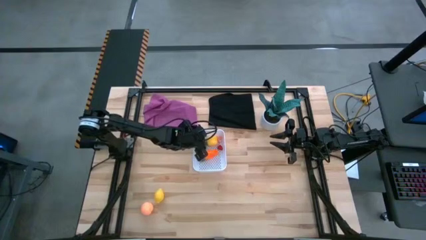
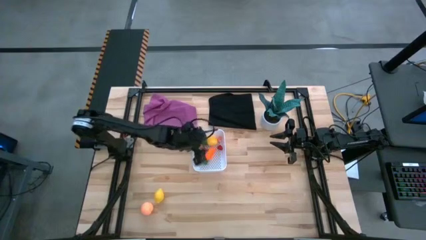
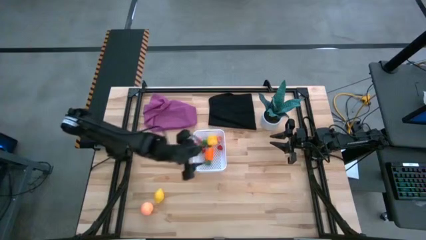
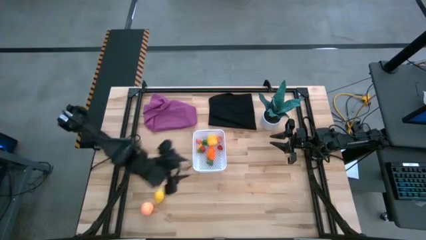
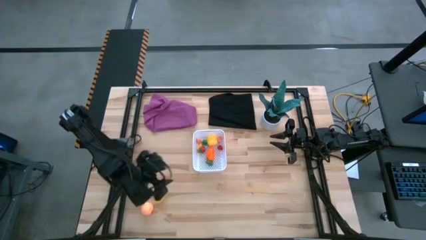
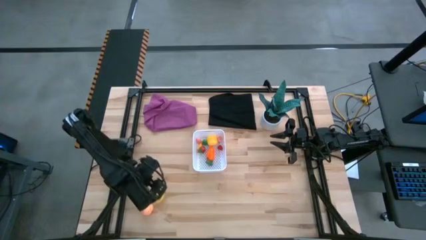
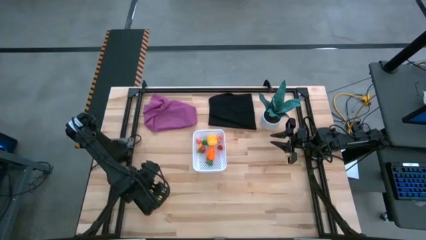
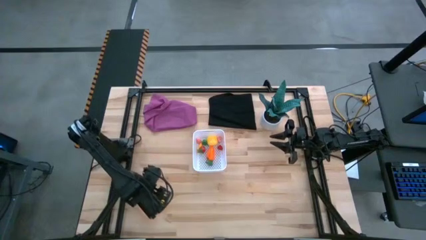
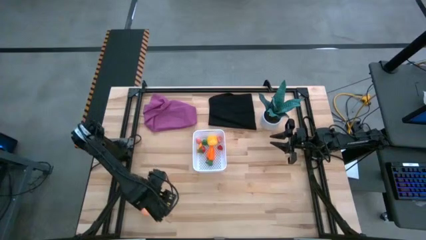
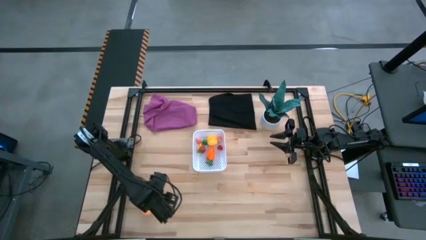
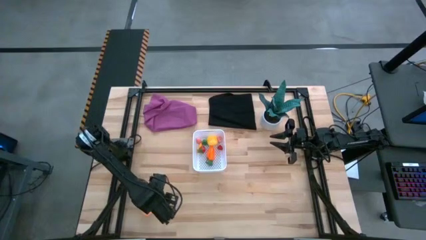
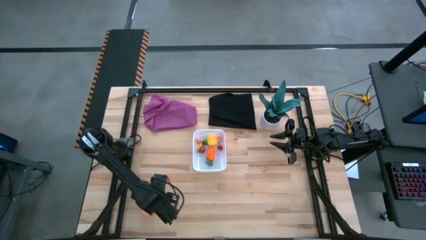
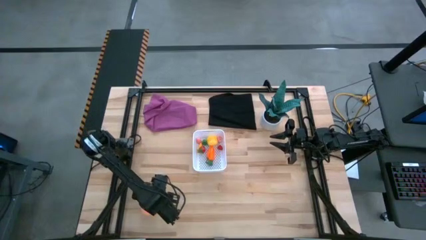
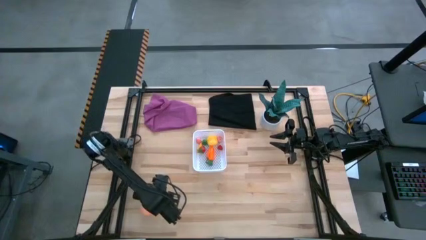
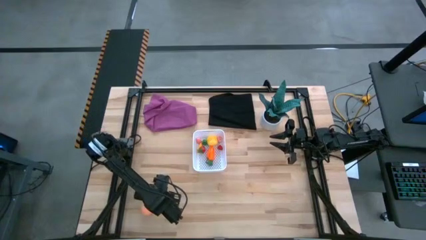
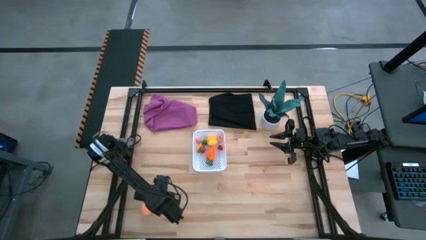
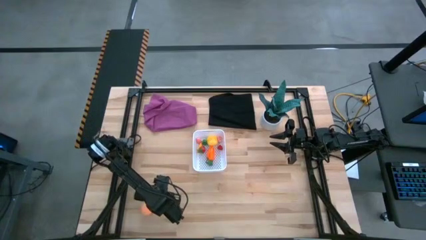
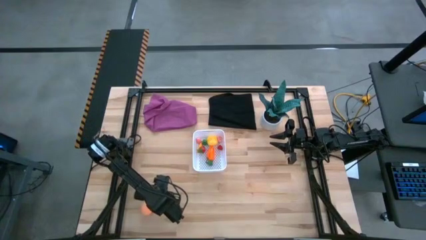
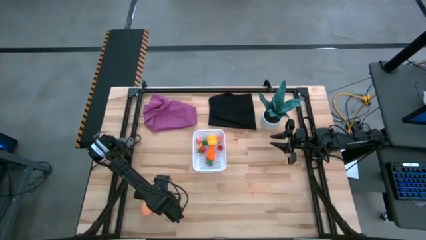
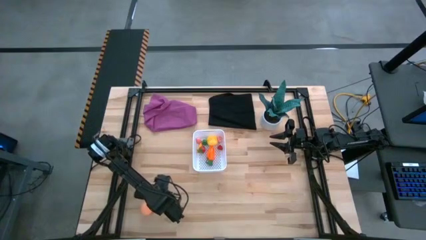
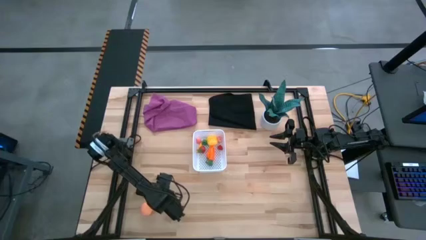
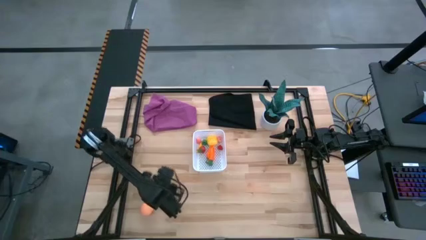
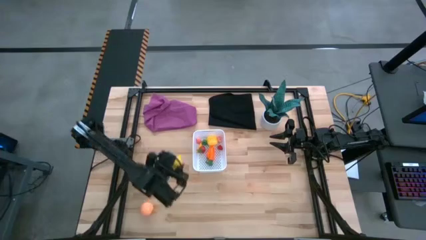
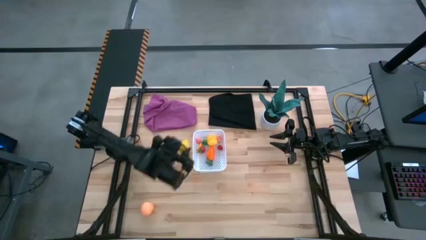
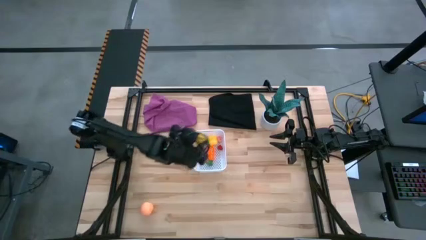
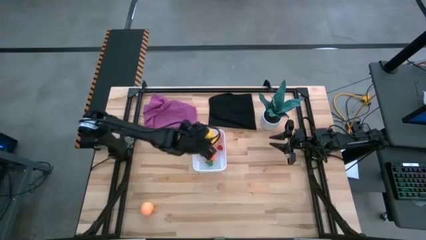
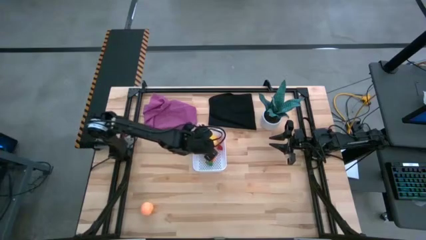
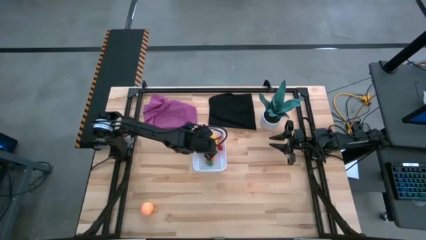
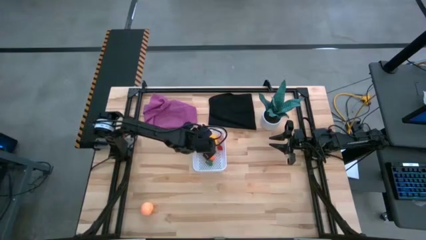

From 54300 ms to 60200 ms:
Task: Pick and placing Produce into tupperware
Put the yellow lemon into the white bin

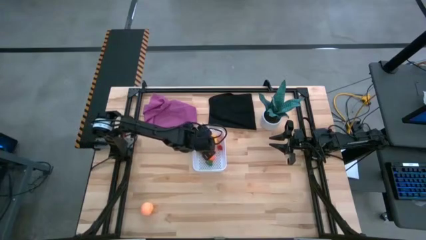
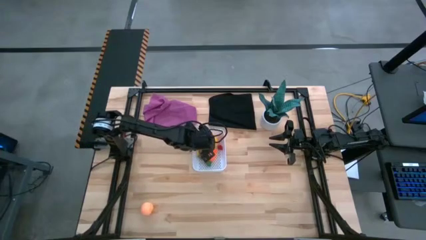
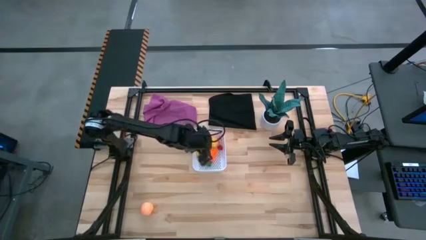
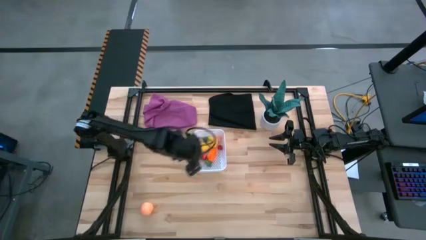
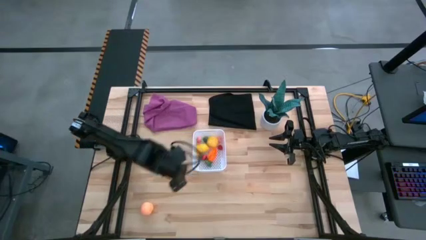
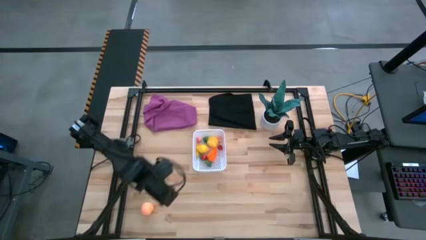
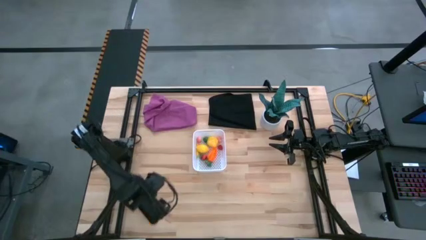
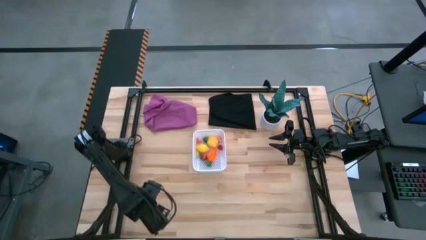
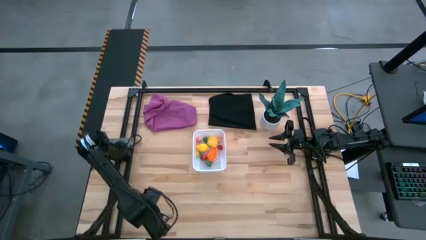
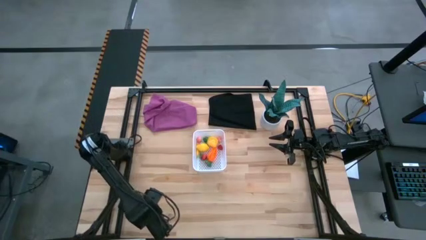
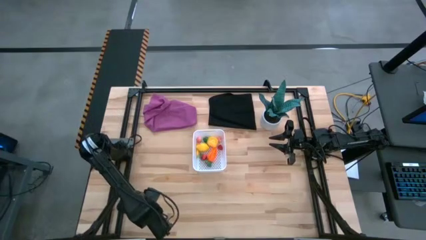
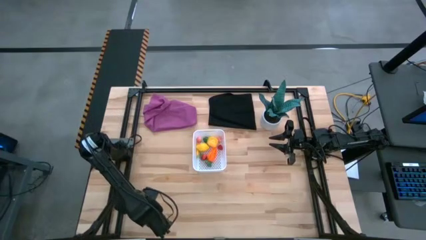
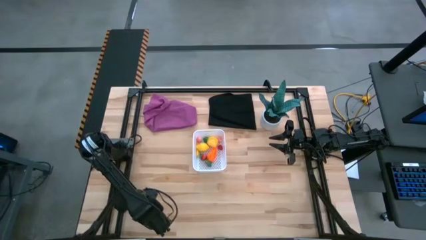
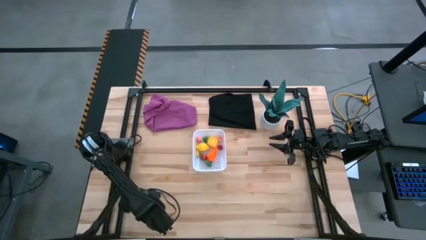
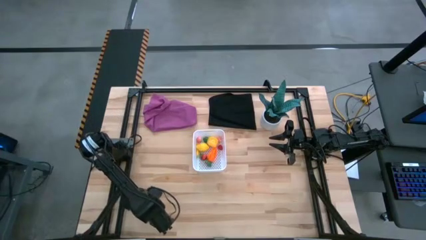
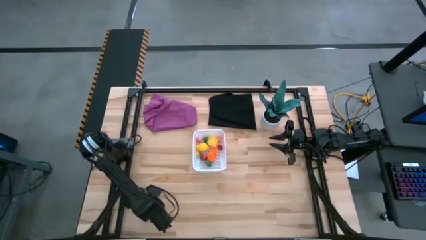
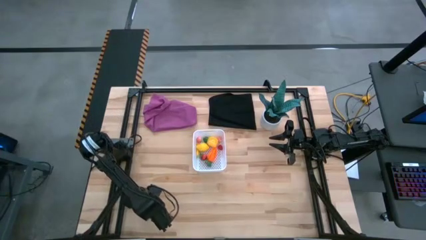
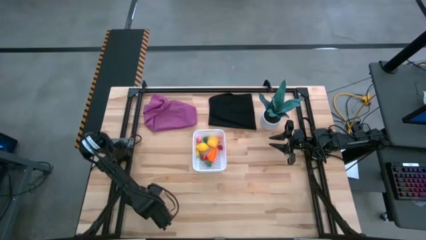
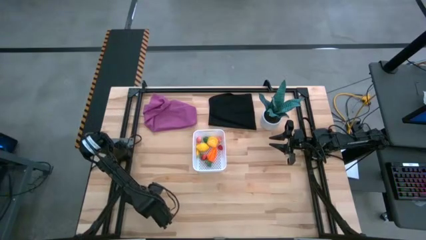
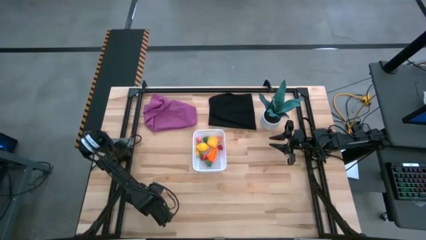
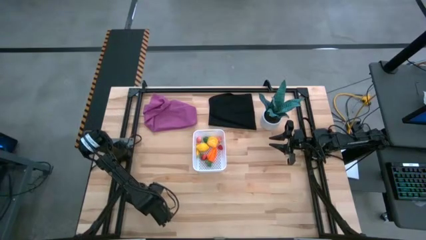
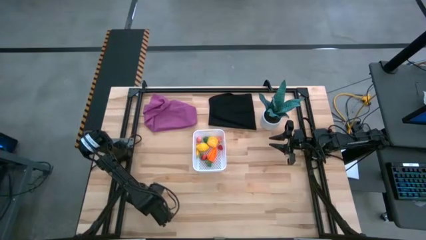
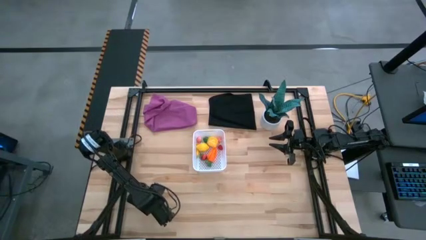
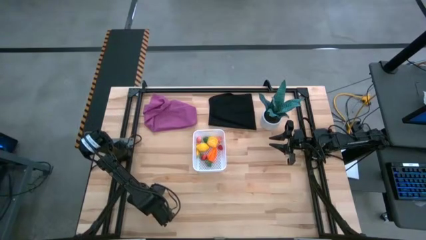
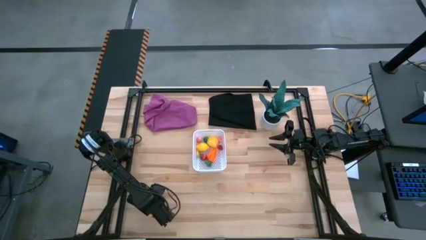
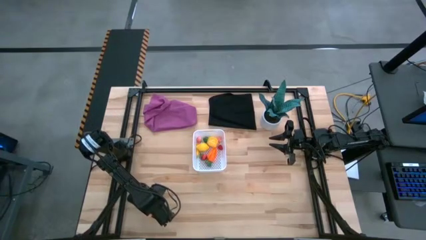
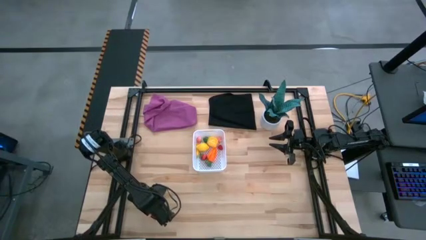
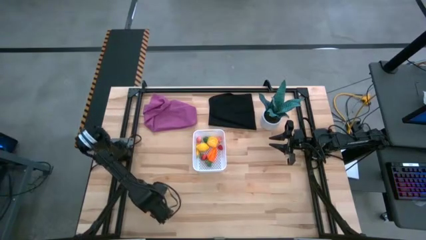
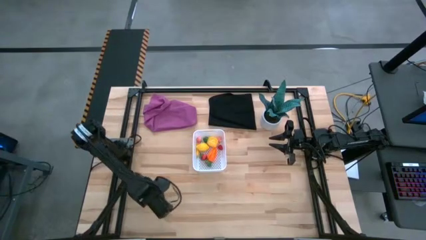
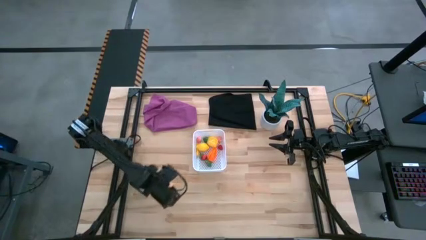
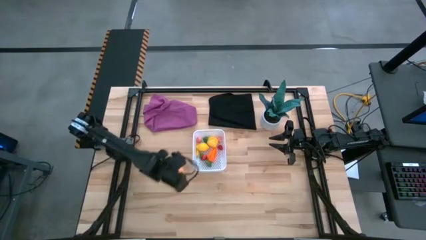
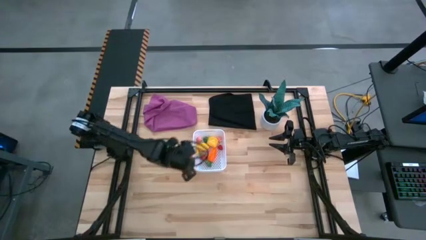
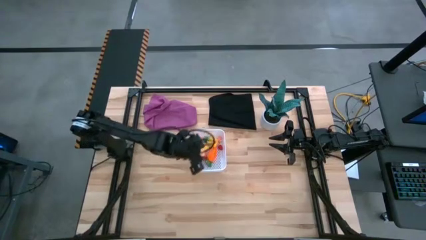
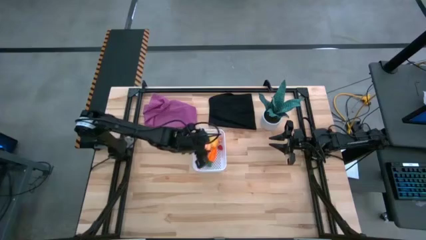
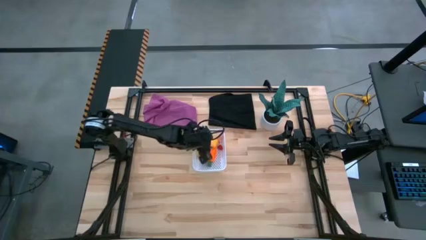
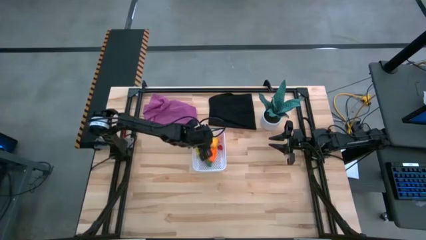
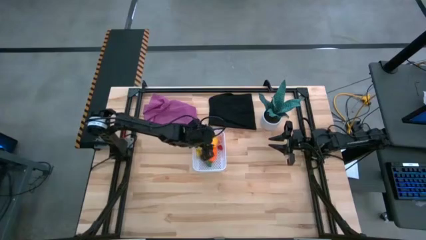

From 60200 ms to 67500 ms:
Put the light orange peach into the white bin

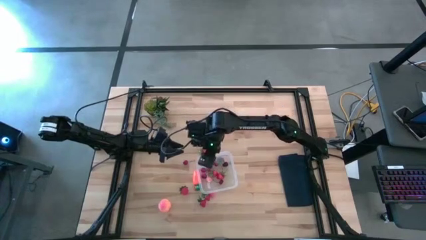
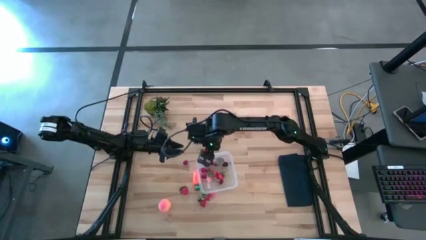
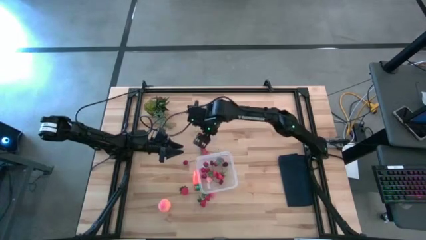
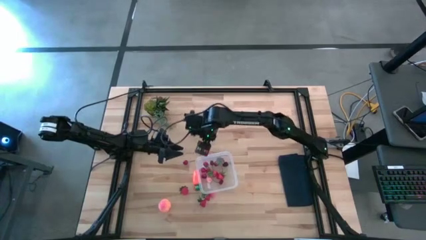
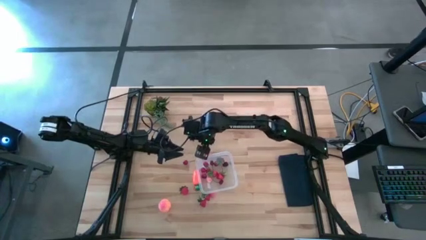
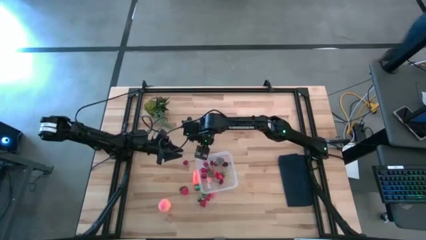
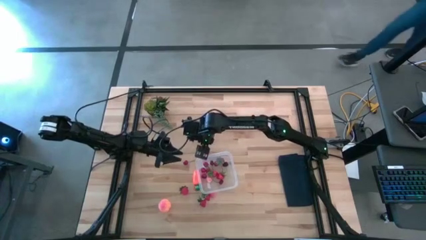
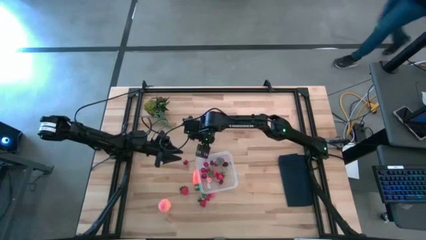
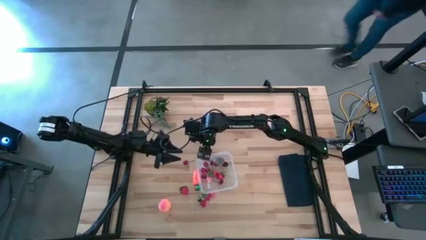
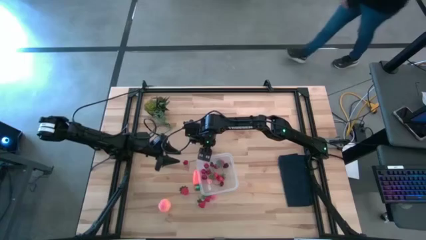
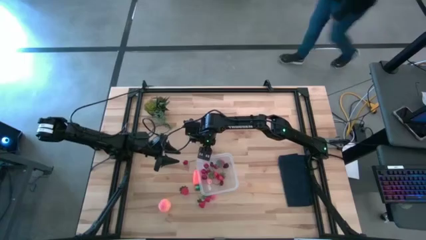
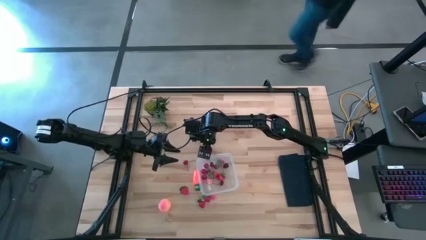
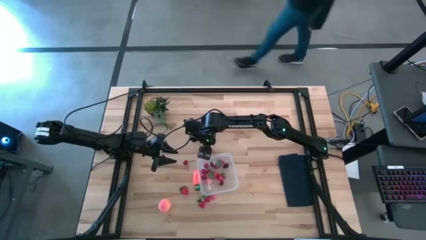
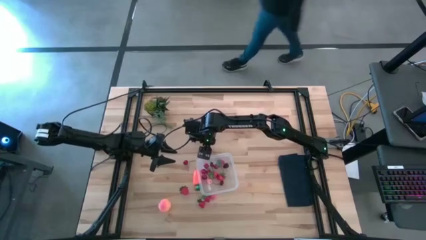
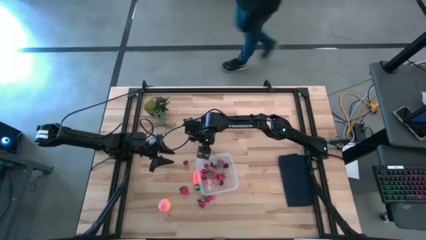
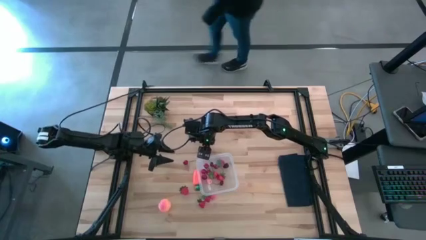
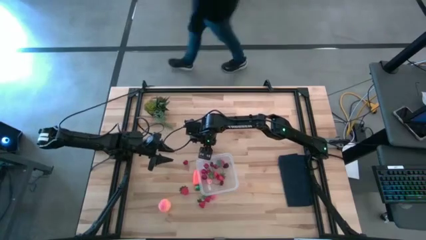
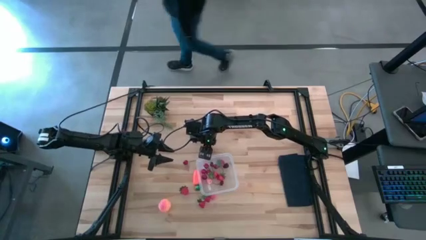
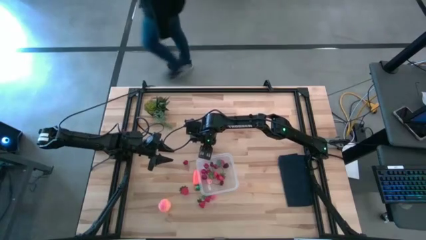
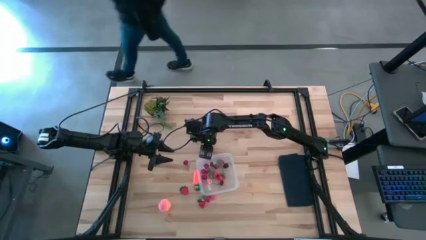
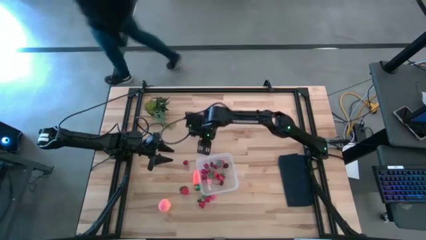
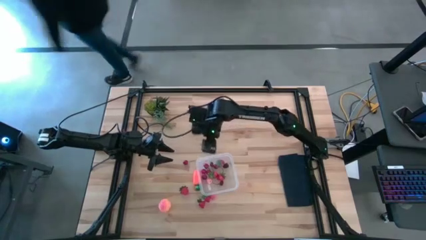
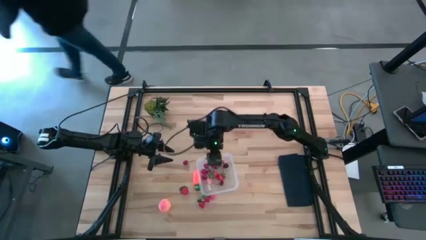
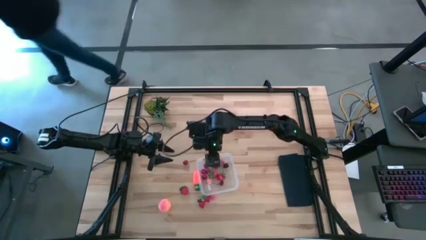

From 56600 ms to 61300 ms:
Task: Pick and placing Produce into tupperware
Put the strawberry into the transparent container
